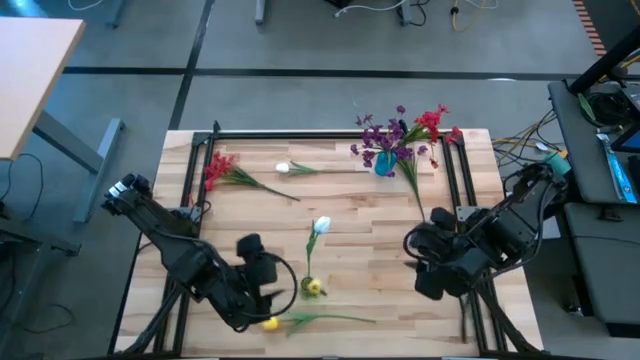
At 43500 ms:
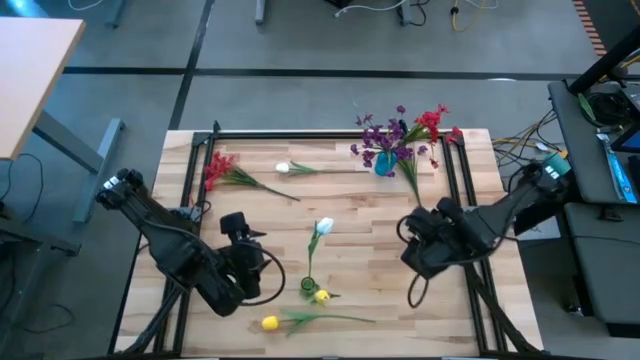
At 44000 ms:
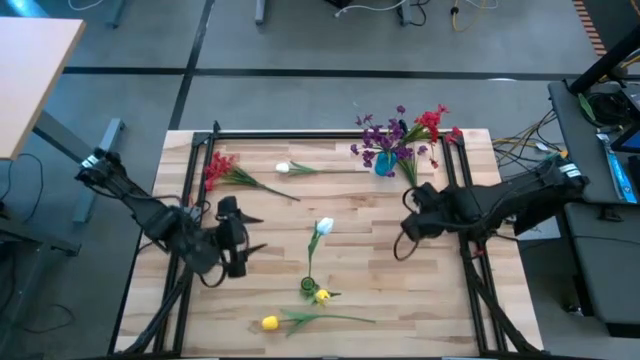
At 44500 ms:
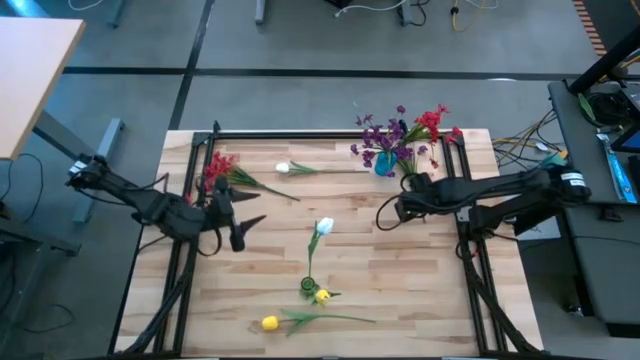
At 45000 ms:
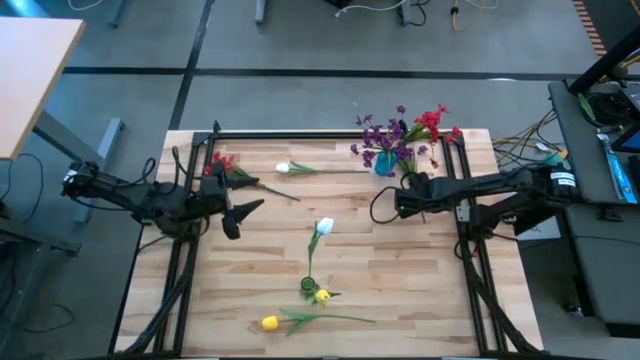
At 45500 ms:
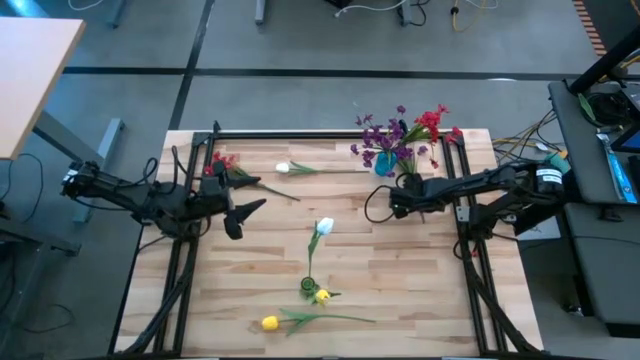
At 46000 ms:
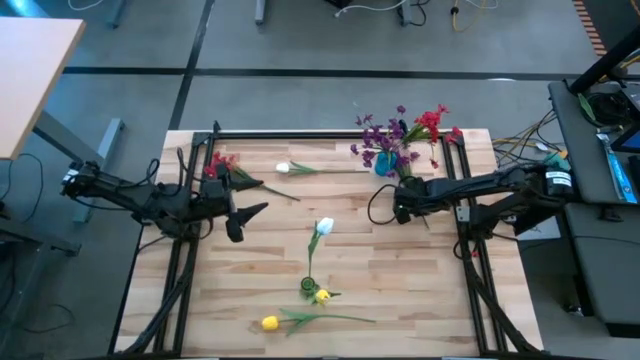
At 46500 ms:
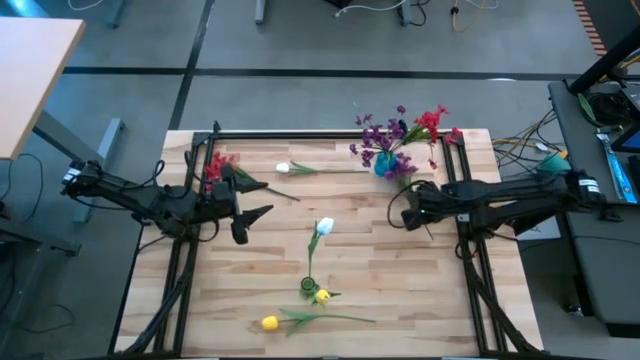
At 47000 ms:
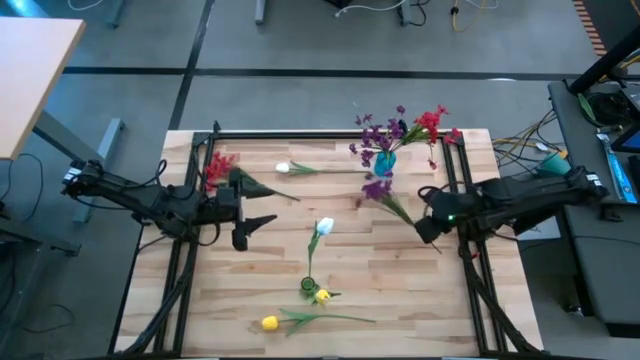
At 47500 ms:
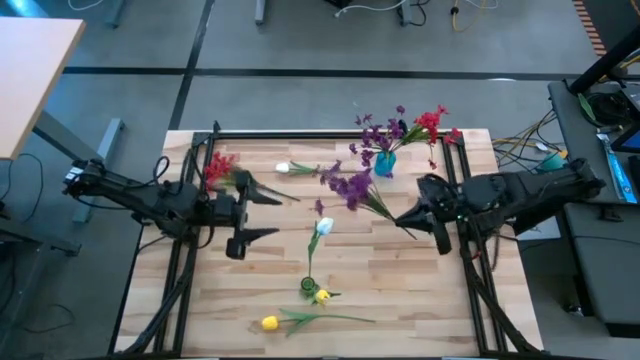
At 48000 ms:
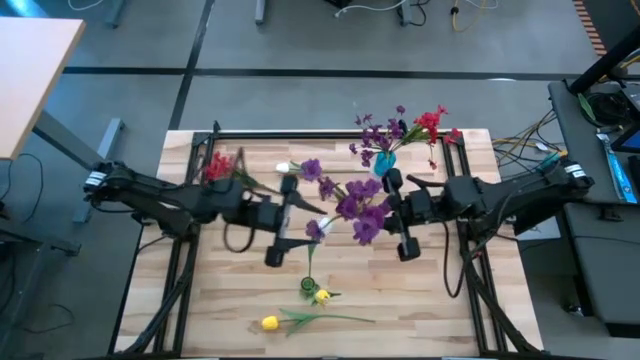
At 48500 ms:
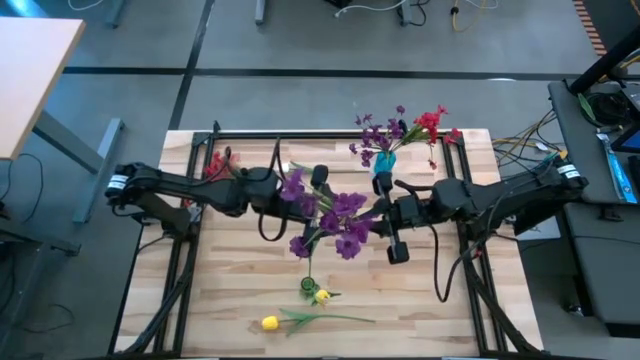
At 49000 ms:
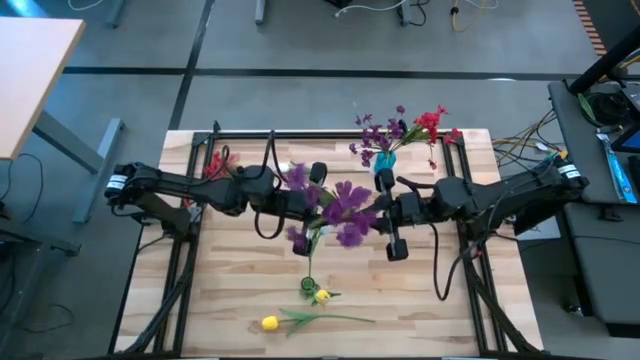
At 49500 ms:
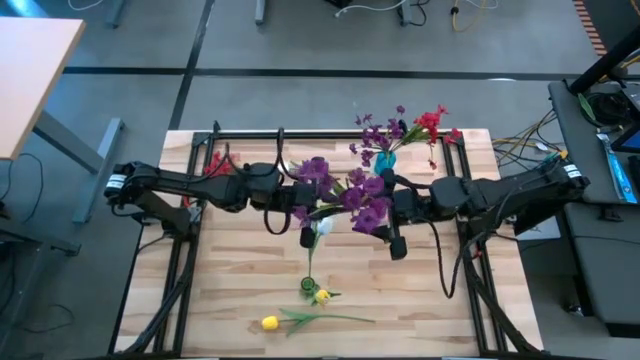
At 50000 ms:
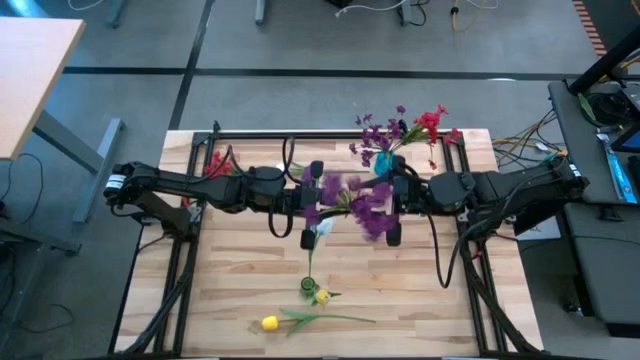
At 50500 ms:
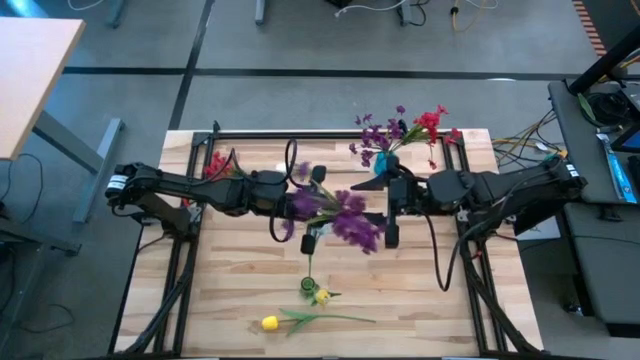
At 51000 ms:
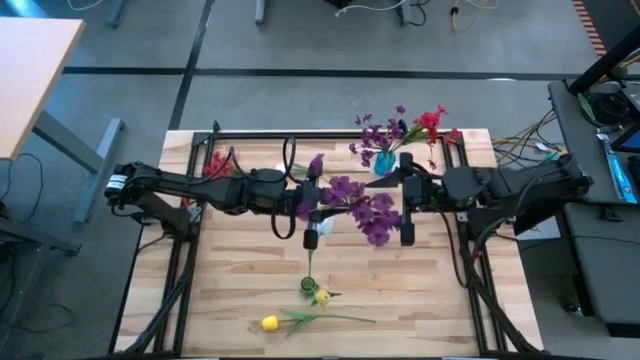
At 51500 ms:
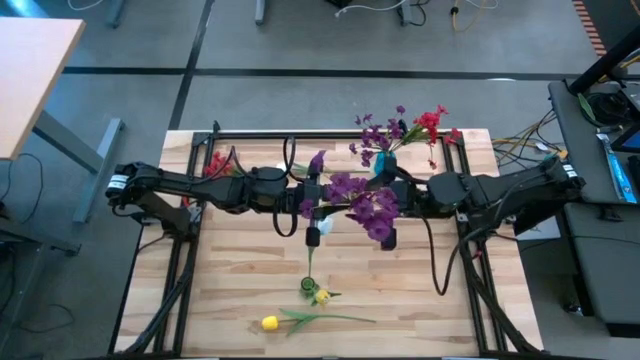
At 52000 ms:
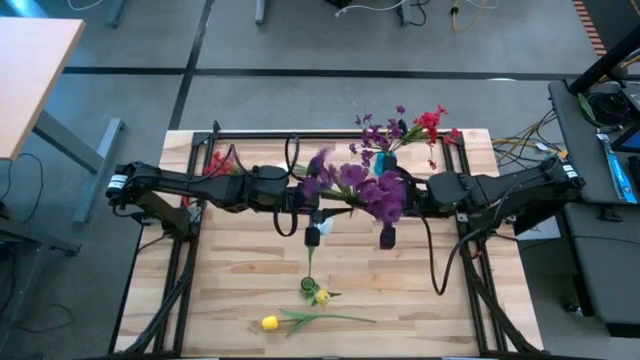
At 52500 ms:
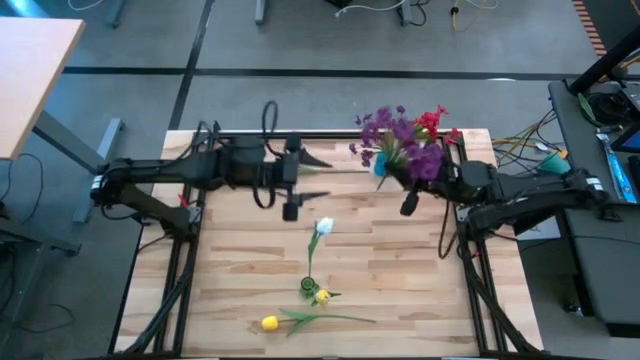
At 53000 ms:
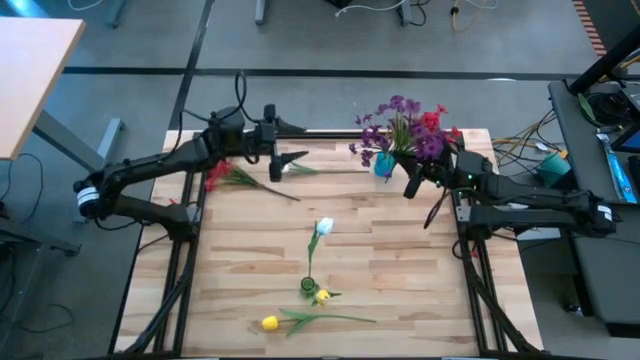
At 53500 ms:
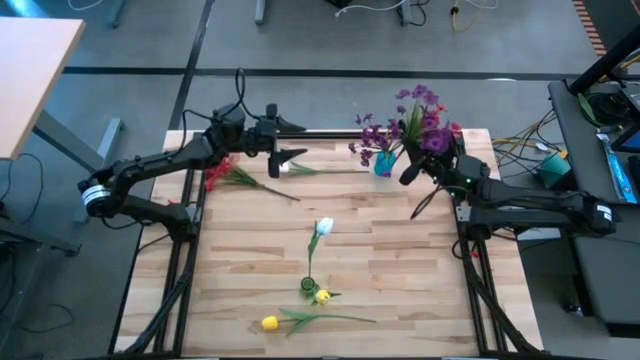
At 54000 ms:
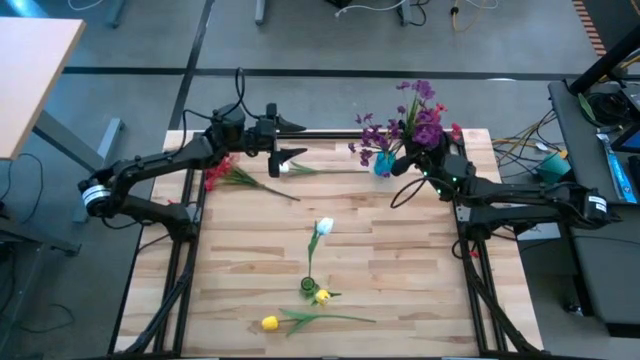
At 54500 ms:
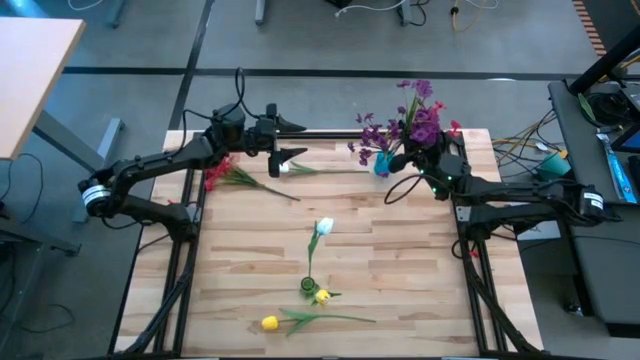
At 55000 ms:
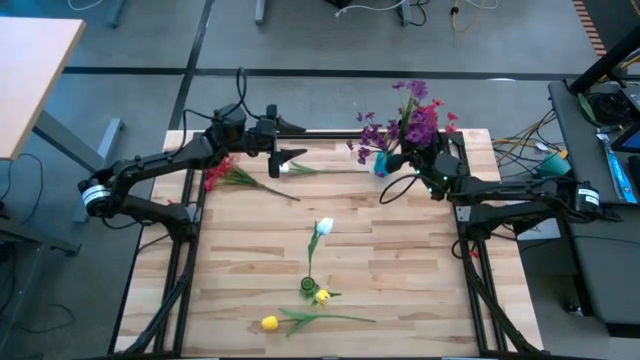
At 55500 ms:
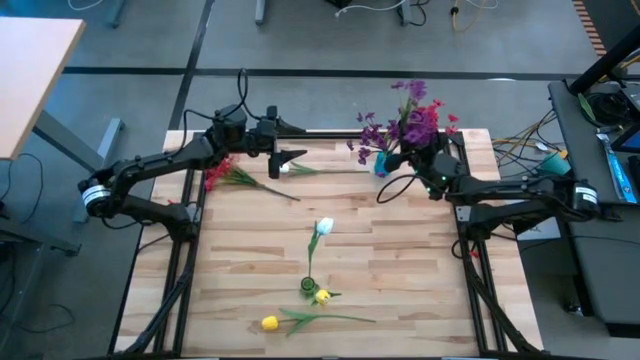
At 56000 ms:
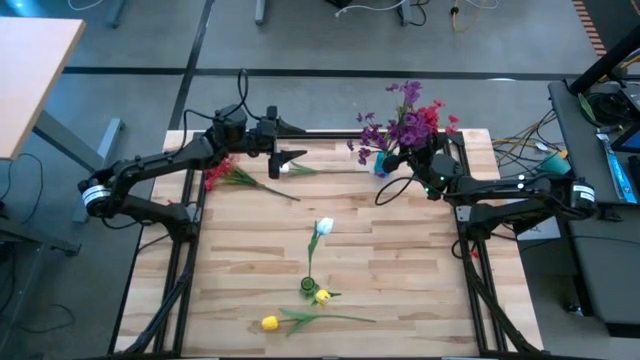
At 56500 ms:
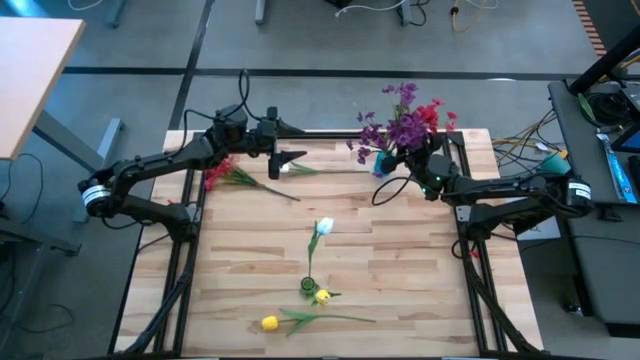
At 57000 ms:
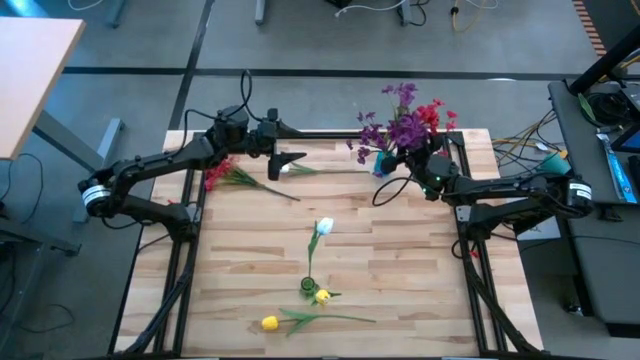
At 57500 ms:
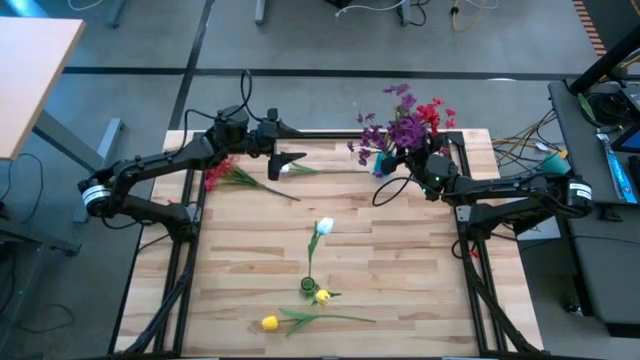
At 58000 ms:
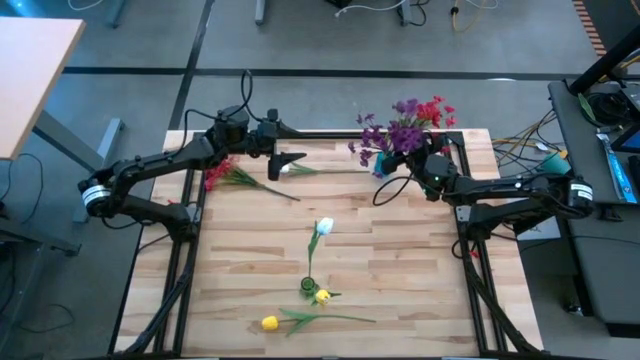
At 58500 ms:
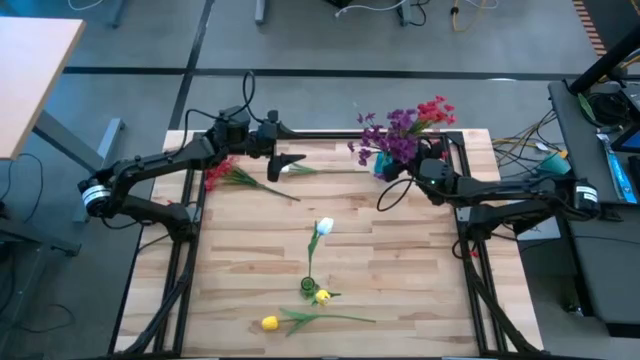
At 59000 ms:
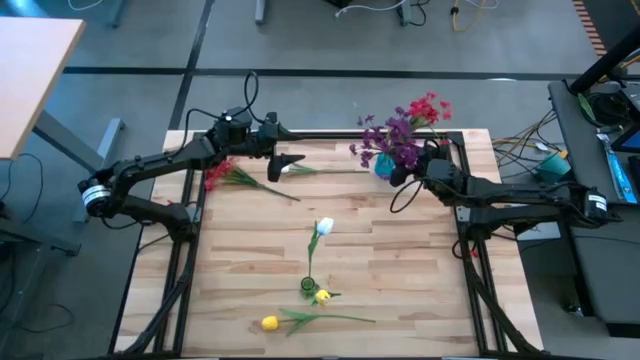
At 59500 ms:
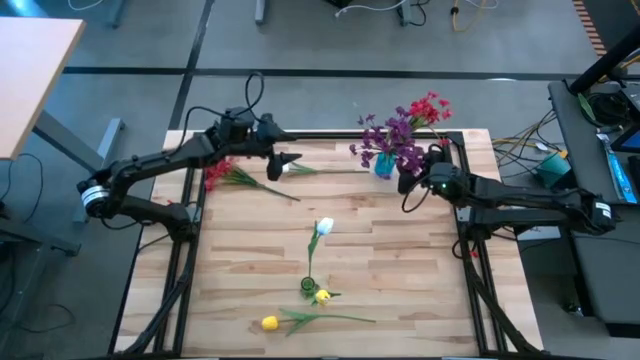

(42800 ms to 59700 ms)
Task: Sort flowers into vase by color
Put the purple flowers into the blue vase

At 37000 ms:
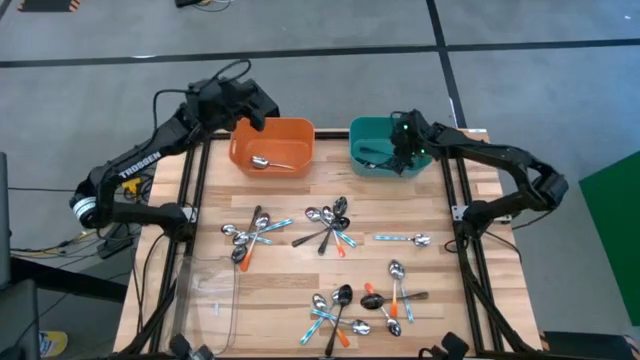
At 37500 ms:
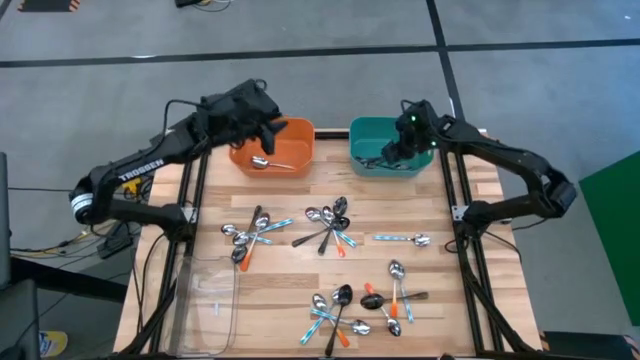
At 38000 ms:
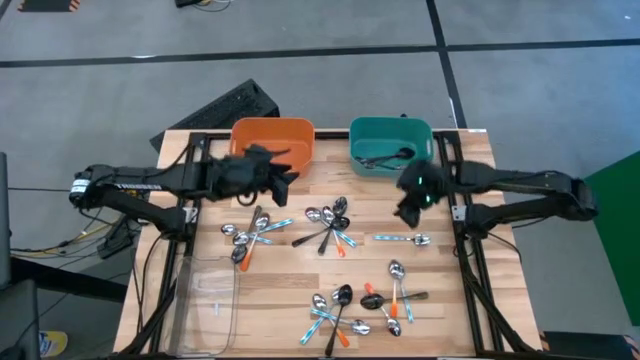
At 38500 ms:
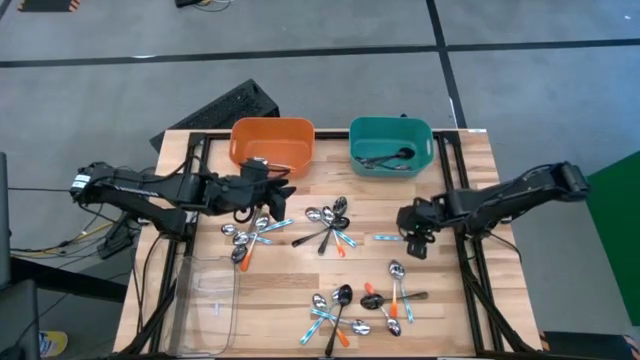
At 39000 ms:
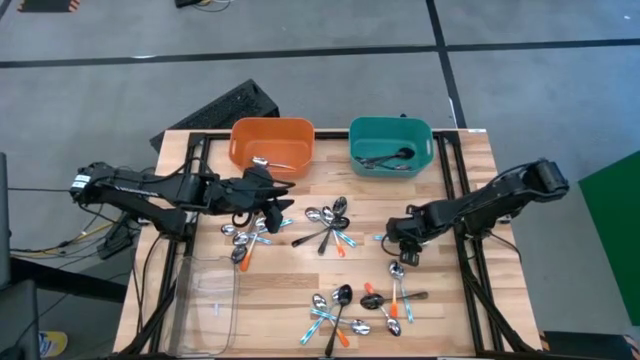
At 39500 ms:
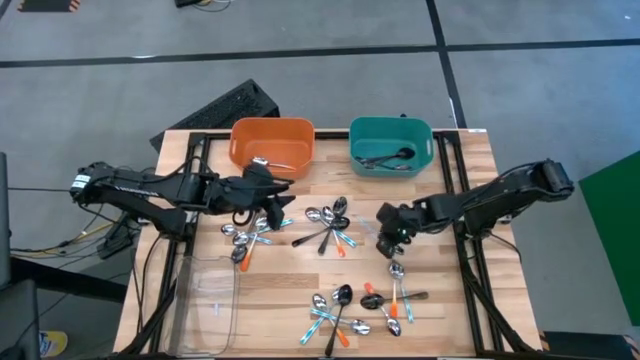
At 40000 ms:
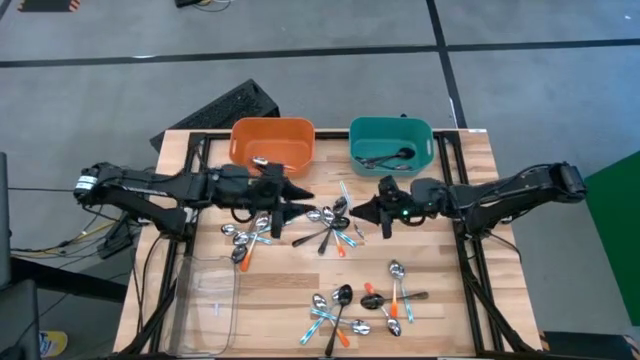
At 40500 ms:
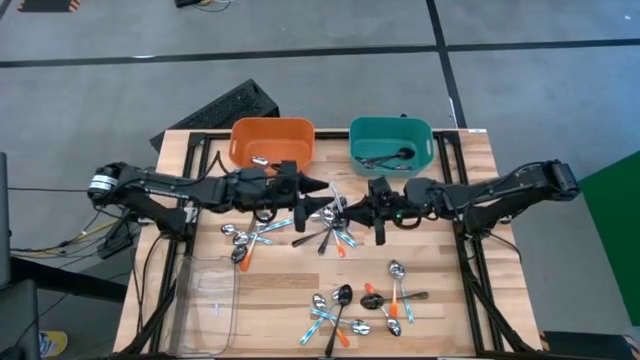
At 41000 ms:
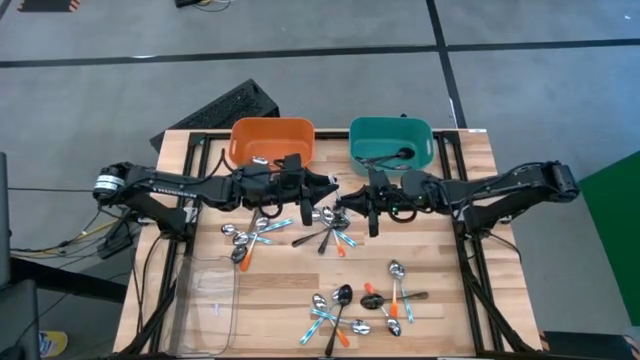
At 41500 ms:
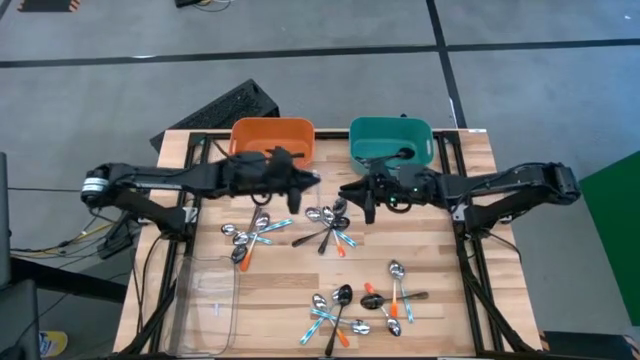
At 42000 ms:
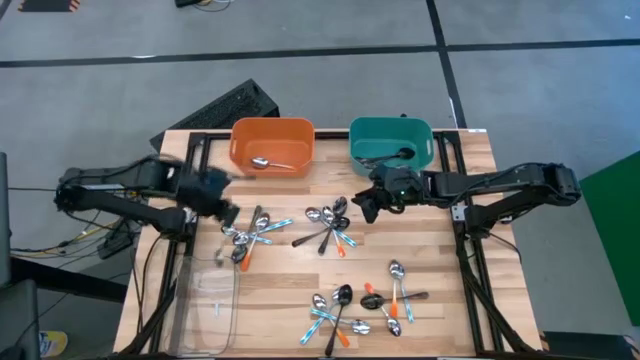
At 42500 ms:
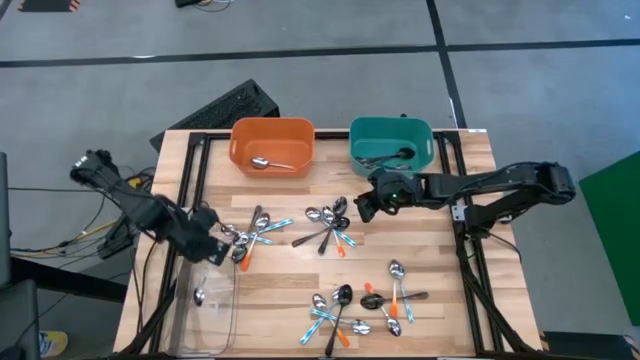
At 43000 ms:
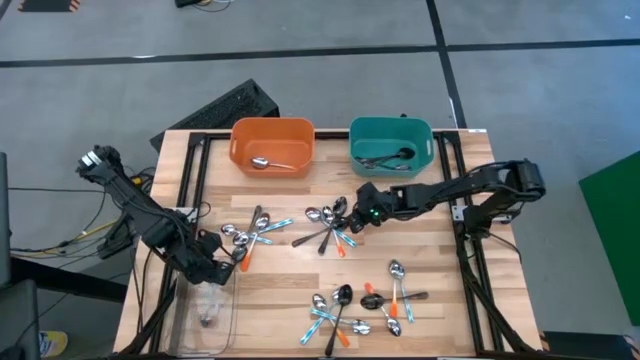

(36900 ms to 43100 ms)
Task: Sort silverware by color (type)
Put the green spoon into the transparent bin
